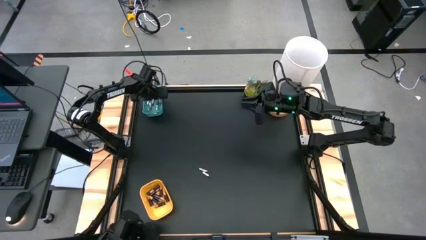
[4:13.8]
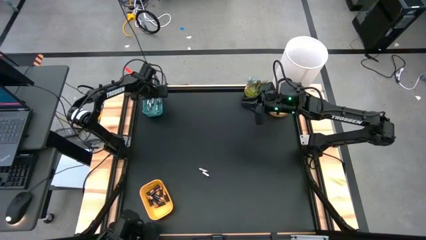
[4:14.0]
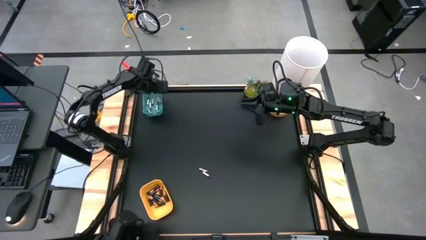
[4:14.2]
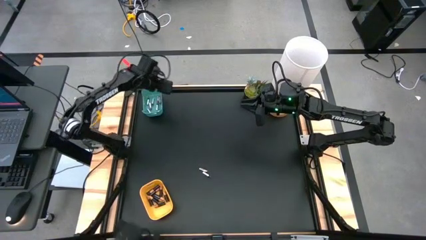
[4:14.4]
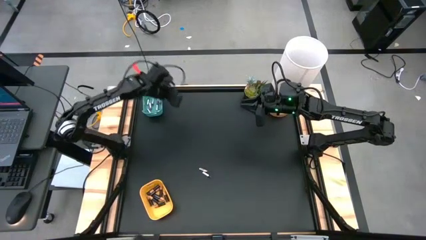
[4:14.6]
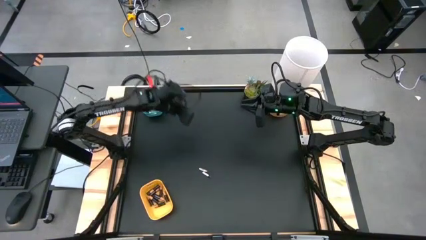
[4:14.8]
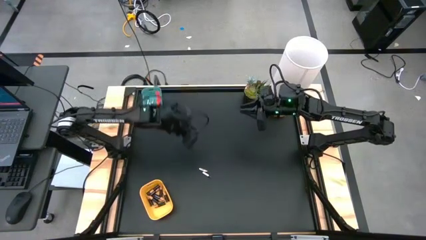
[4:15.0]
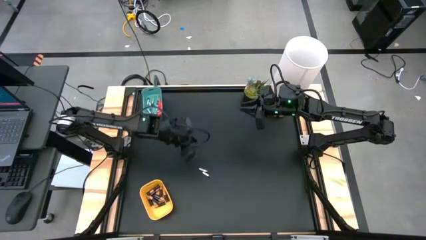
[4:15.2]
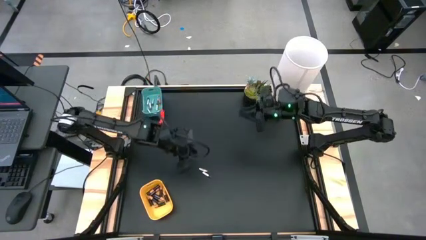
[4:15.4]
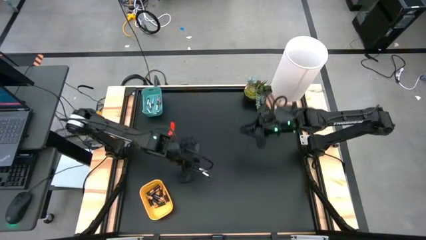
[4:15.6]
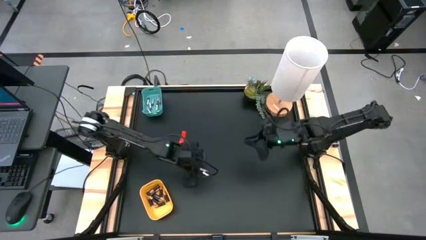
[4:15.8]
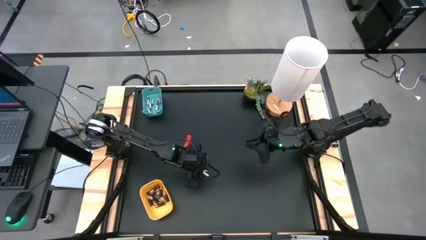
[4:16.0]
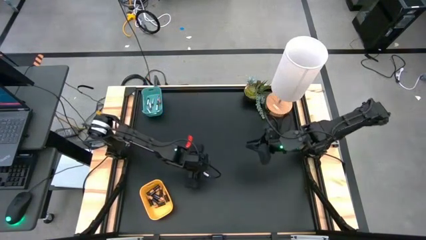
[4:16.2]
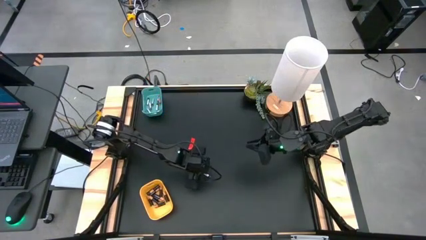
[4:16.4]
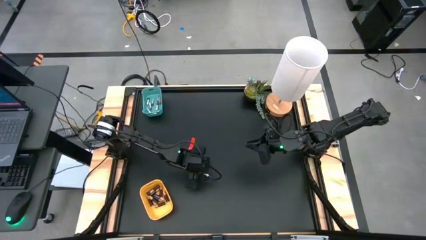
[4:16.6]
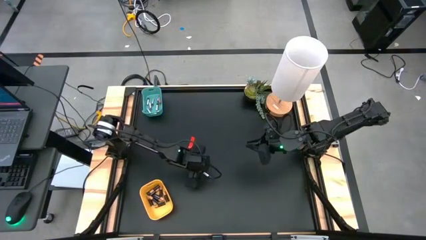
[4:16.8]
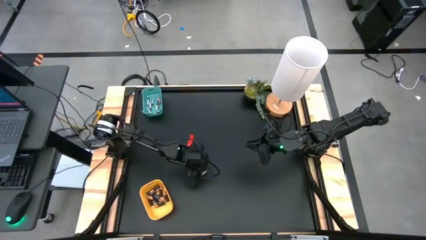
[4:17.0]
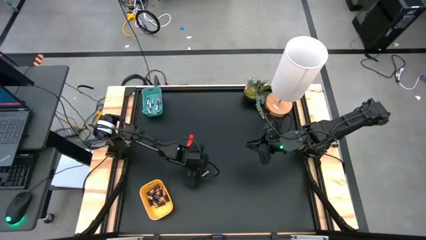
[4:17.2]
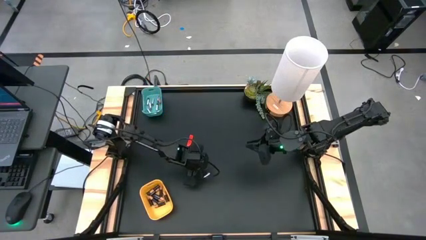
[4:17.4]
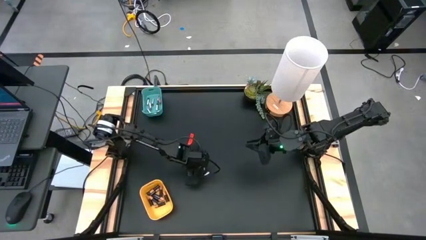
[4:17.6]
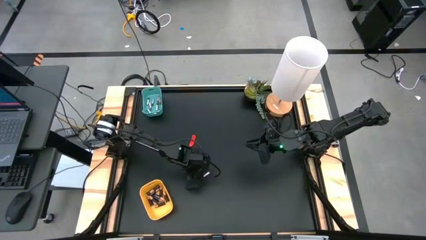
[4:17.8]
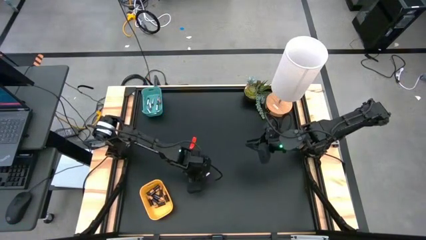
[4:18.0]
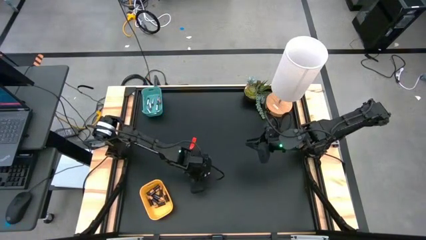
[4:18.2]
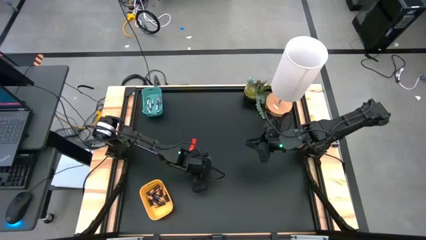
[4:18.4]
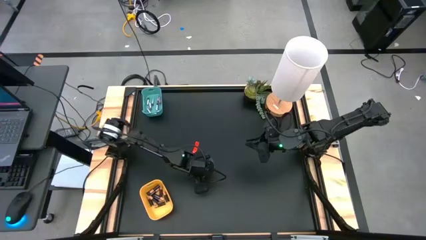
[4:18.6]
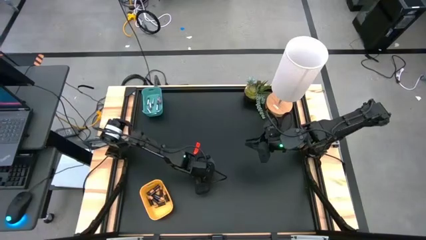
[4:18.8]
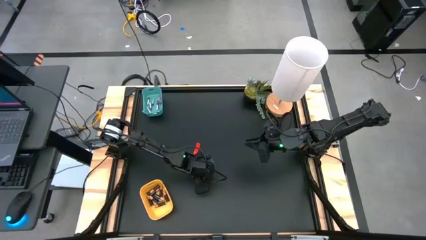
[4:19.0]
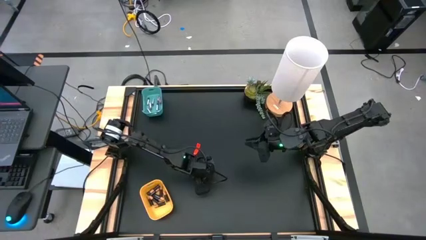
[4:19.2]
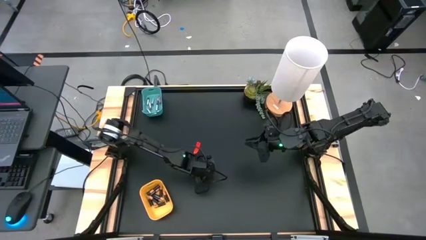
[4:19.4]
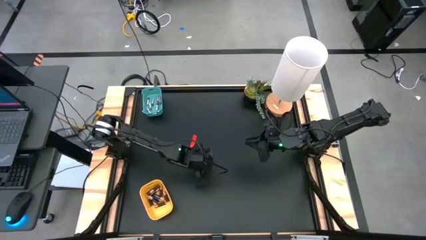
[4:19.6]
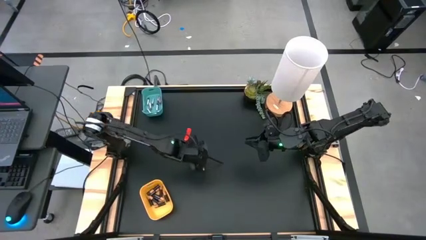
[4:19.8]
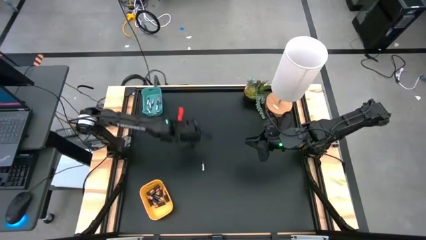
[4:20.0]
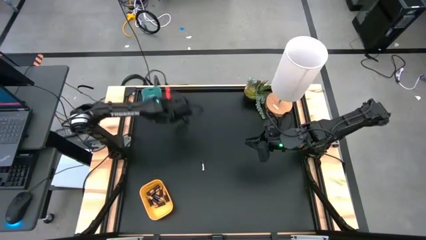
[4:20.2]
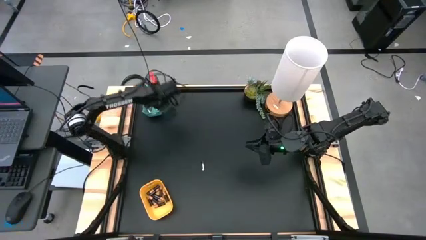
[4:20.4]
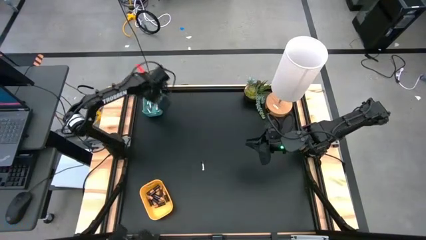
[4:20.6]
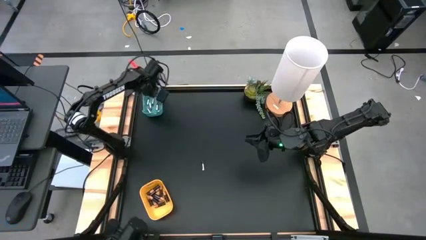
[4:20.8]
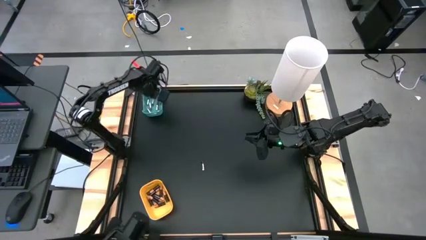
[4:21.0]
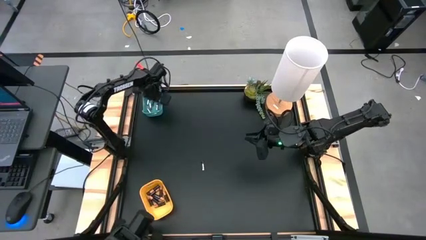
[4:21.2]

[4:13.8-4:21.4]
Task: Sort batteries
Put the silver battery into the blue bin

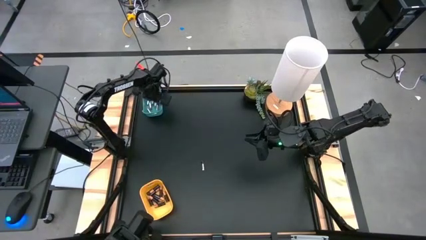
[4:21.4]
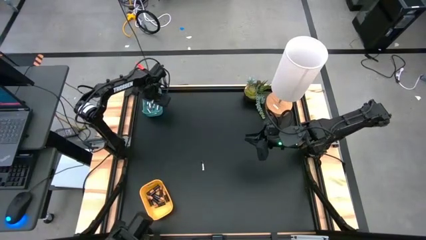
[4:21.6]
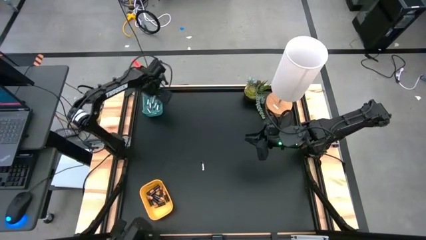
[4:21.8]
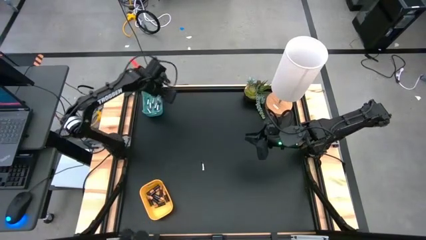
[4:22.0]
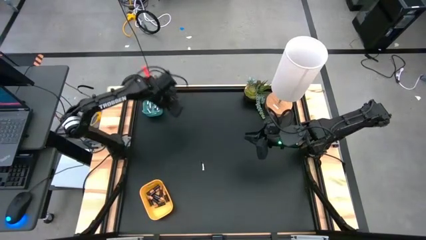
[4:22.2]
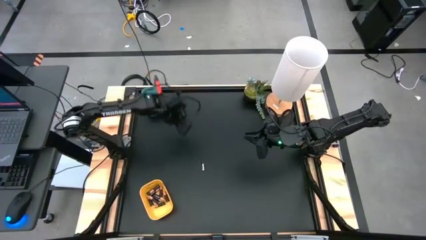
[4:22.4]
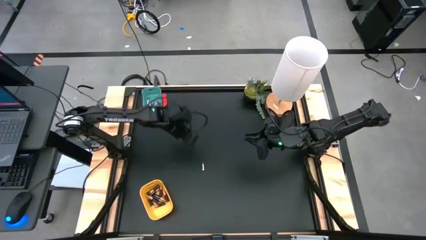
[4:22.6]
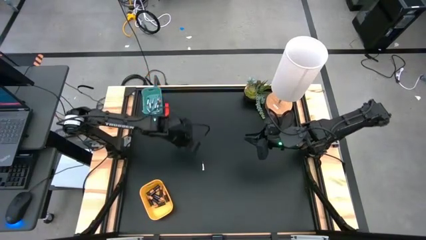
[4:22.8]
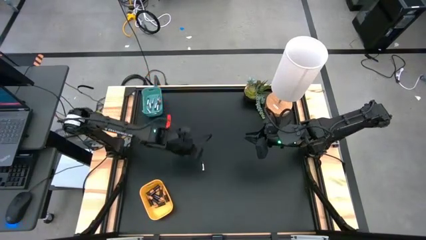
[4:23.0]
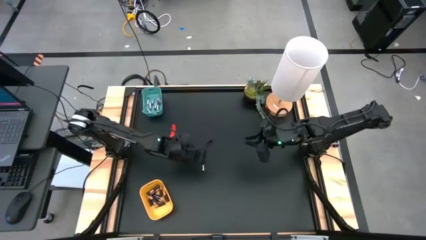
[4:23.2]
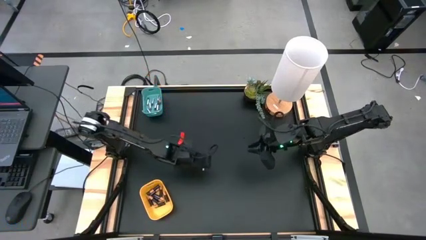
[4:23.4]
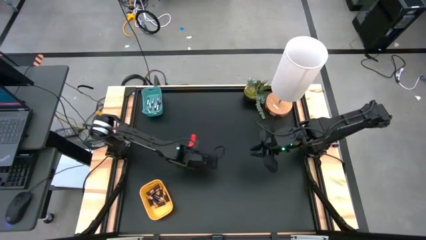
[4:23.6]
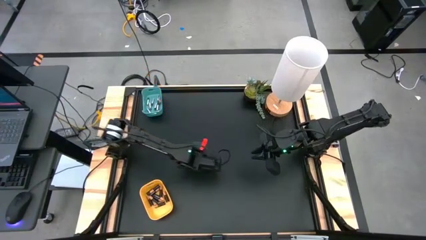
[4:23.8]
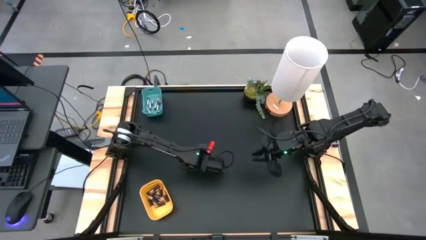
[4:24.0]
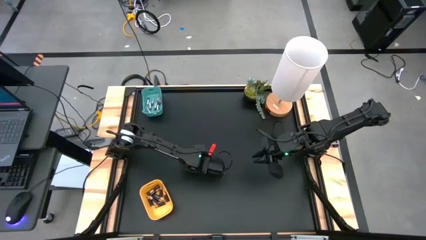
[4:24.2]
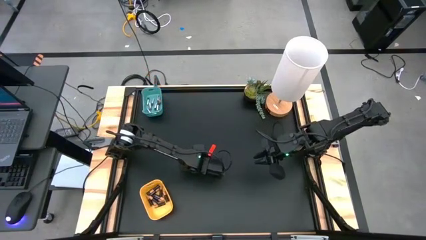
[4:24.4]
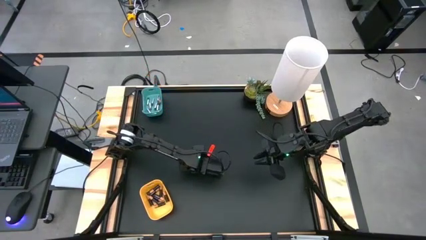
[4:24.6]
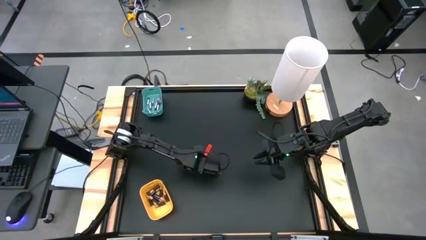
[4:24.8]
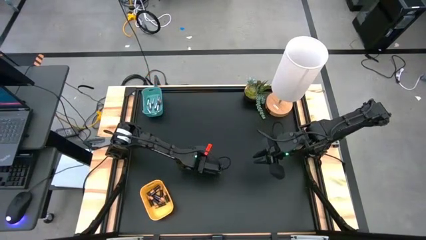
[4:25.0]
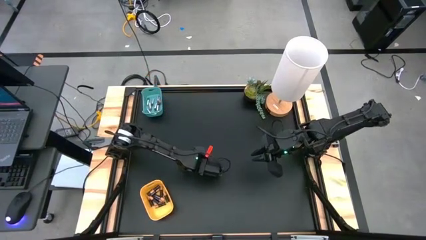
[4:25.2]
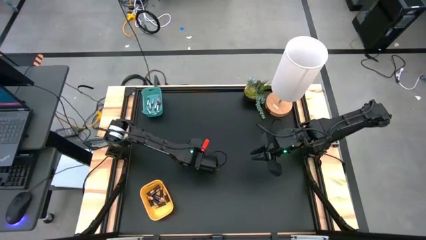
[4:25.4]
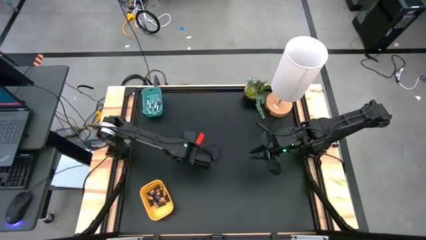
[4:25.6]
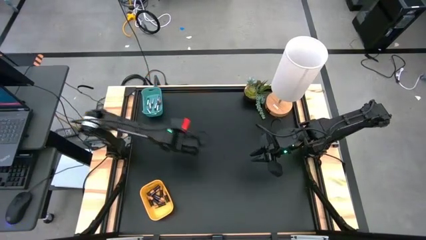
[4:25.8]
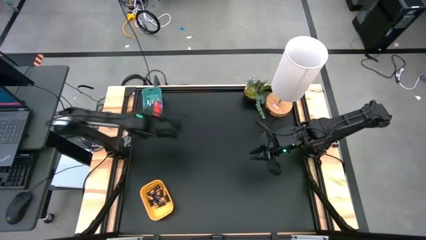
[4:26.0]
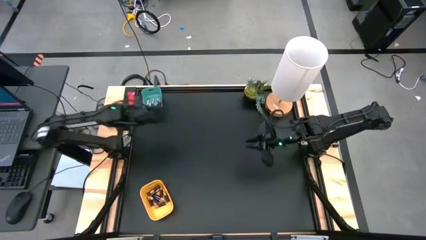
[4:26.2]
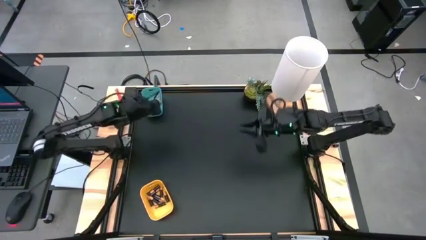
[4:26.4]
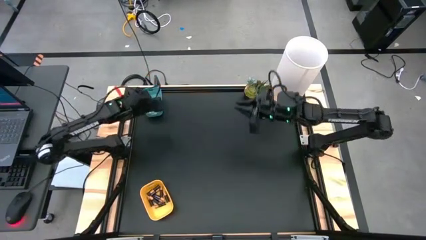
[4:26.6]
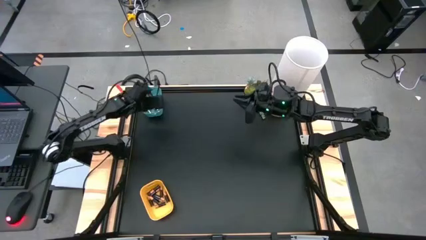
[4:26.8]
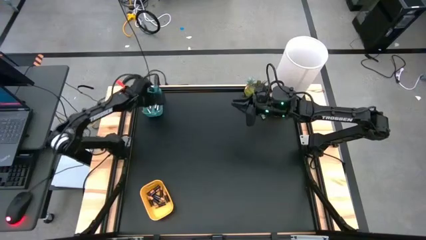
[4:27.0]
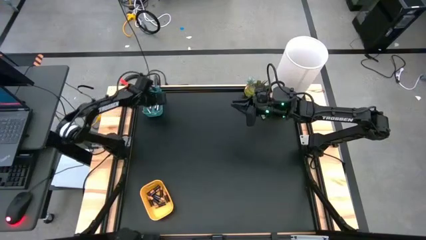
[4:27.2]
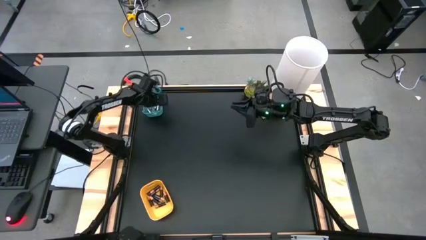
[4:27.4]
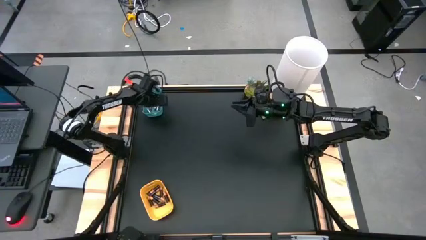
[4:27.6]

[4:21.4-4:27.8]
Put the silver battery into the blue bin

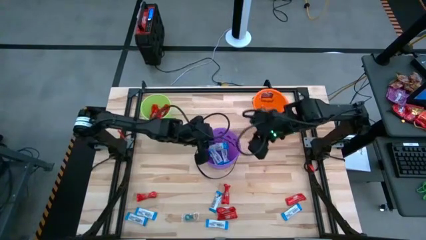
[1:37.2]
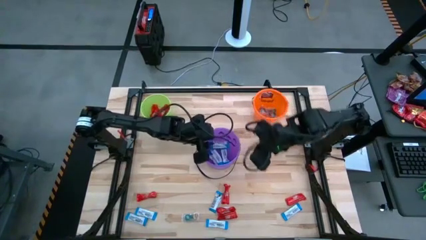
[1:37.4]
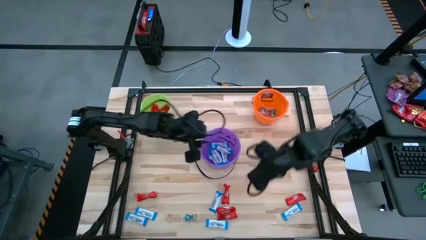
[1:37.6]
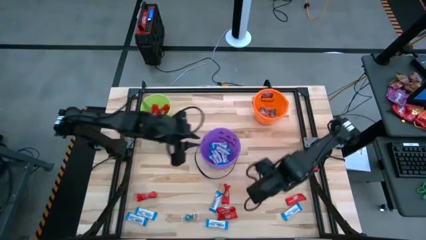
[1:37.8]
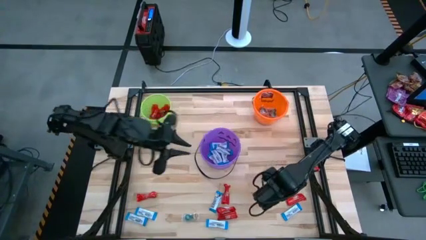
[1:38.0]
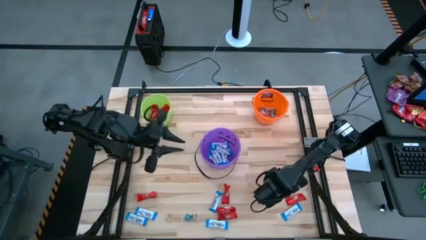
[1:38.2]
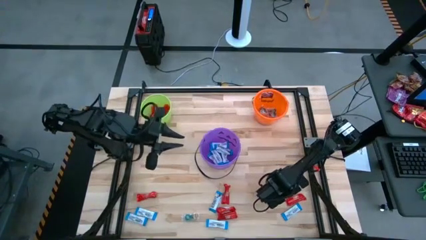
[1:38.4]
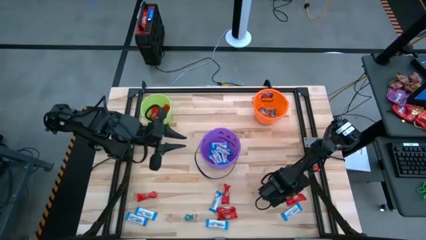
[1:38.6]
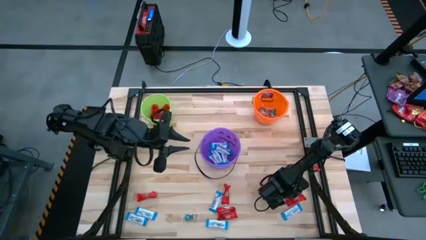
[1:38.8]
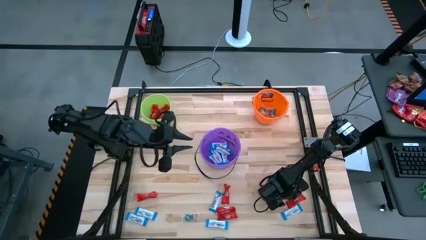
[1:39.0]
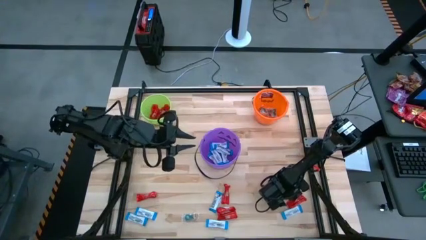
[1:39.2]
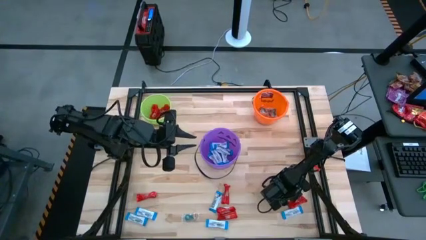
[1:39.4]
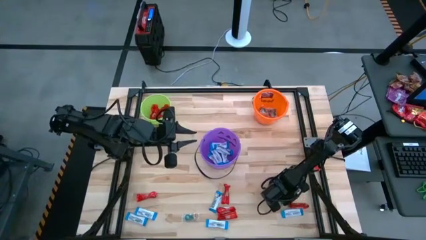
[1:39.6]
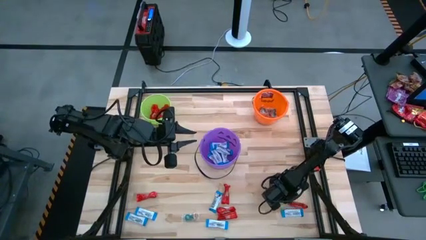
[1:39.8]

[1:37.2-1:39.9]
Task: Sort candy by brand, put in halloween buckets
Put the red chocolate into the green bucket
